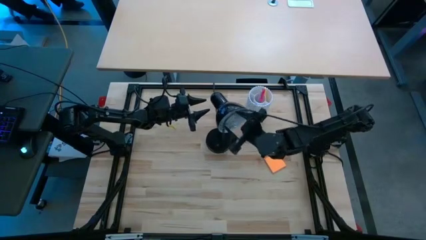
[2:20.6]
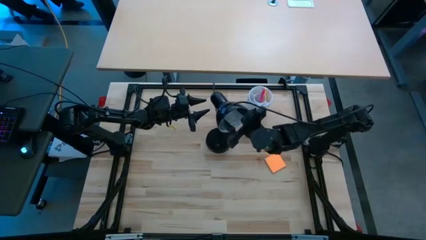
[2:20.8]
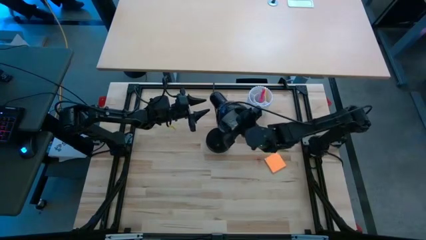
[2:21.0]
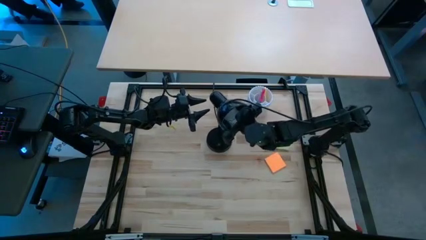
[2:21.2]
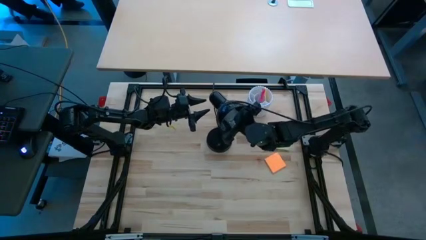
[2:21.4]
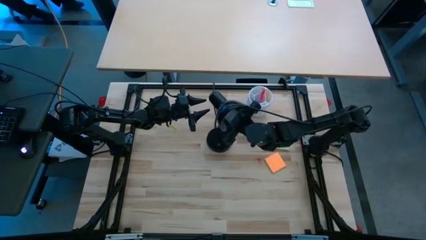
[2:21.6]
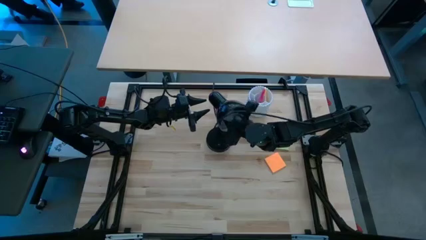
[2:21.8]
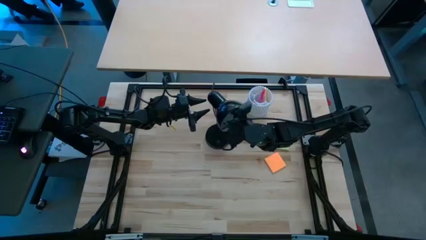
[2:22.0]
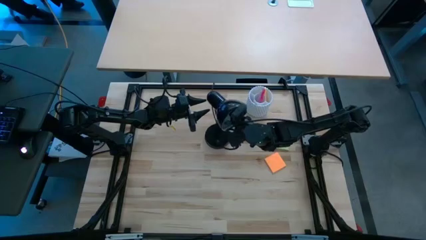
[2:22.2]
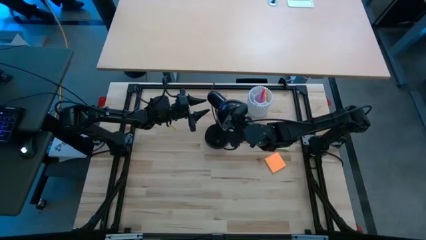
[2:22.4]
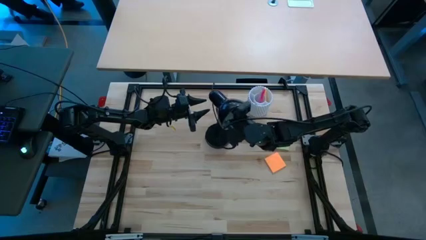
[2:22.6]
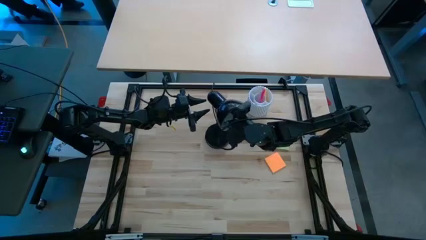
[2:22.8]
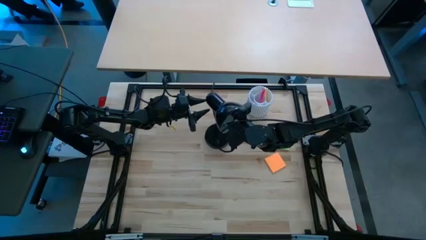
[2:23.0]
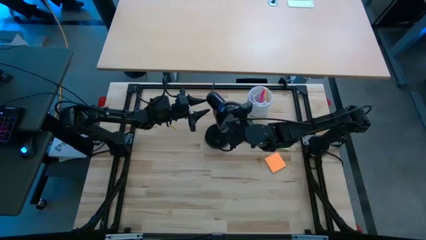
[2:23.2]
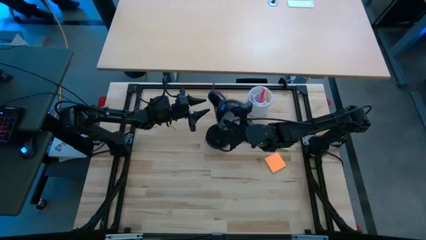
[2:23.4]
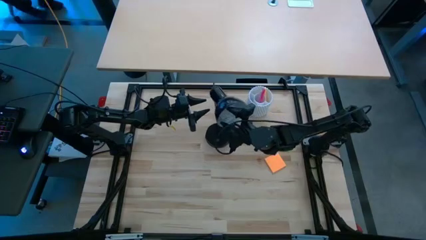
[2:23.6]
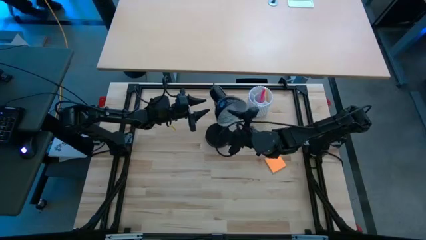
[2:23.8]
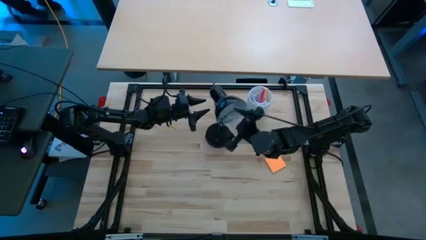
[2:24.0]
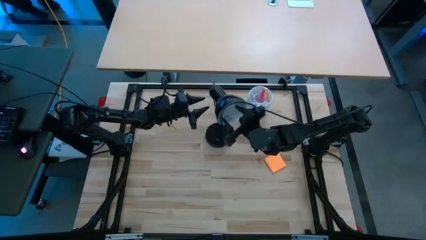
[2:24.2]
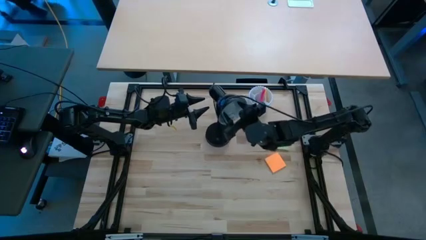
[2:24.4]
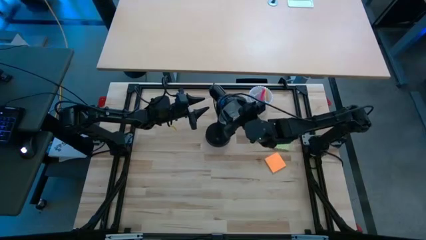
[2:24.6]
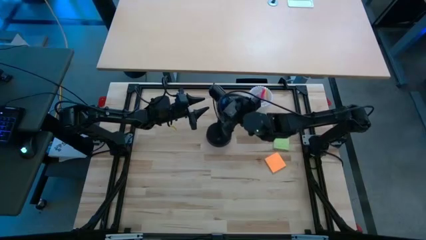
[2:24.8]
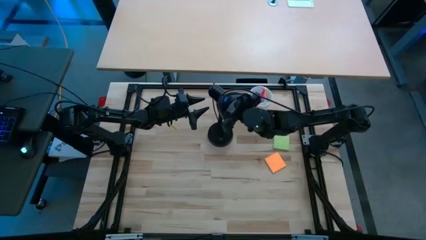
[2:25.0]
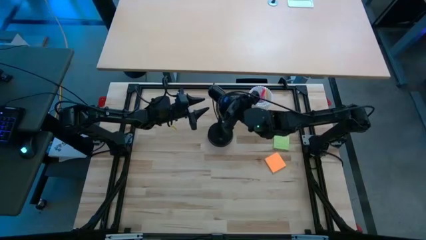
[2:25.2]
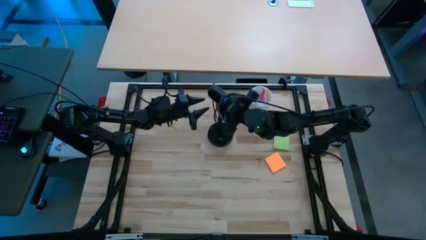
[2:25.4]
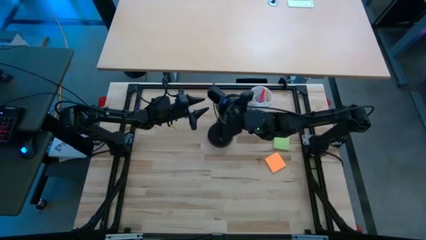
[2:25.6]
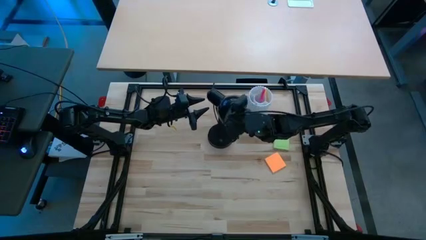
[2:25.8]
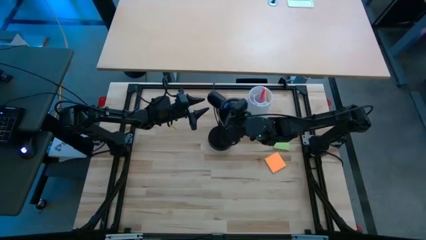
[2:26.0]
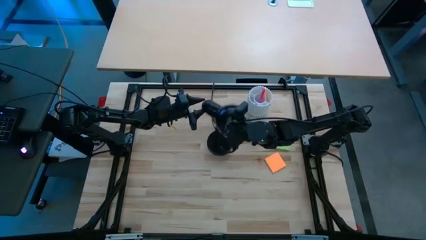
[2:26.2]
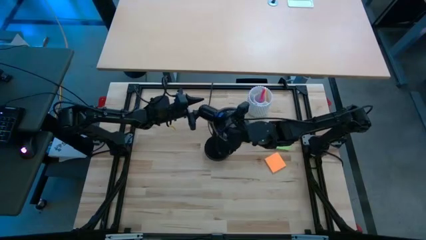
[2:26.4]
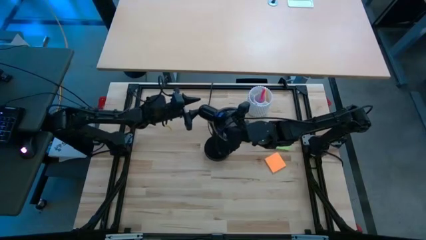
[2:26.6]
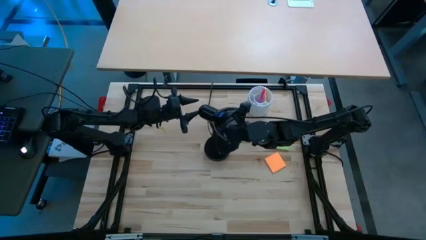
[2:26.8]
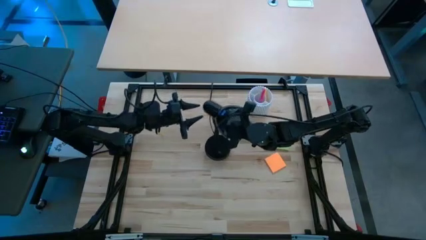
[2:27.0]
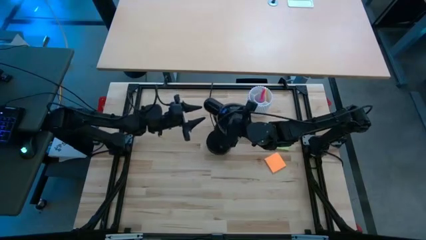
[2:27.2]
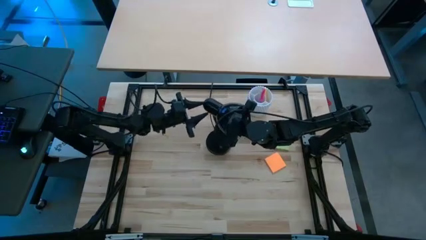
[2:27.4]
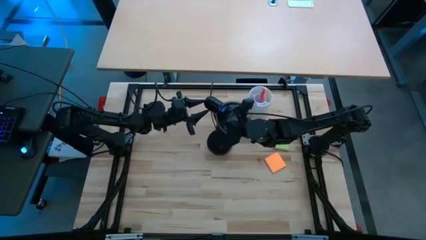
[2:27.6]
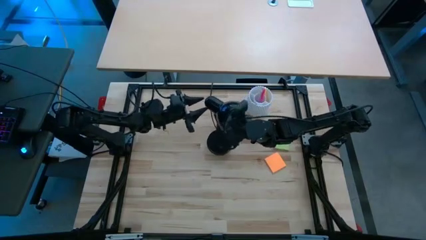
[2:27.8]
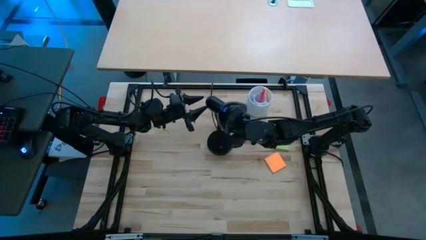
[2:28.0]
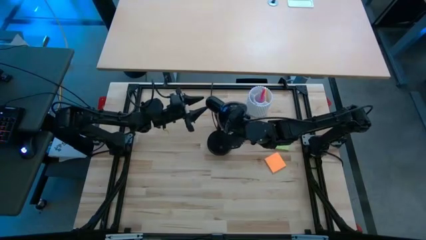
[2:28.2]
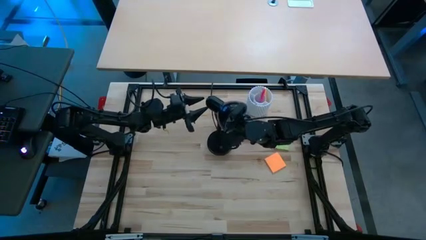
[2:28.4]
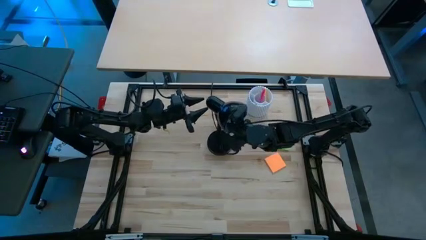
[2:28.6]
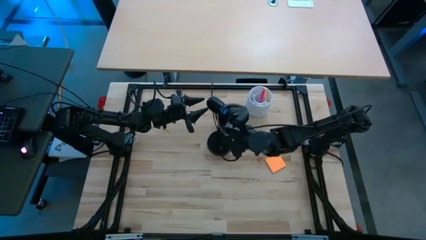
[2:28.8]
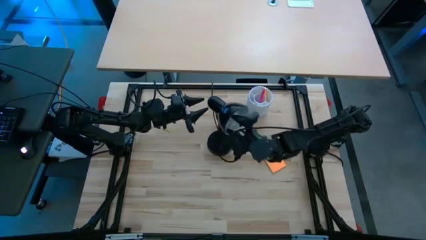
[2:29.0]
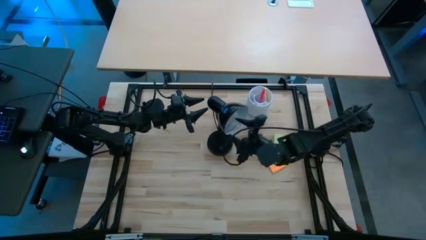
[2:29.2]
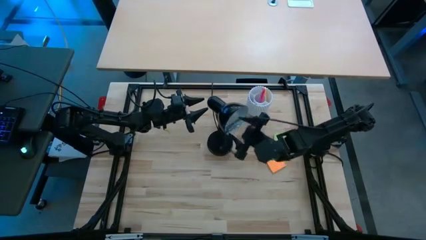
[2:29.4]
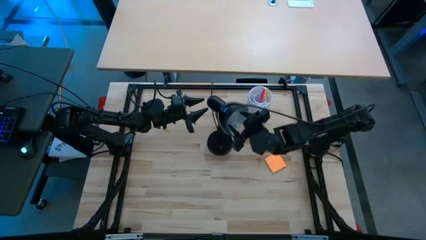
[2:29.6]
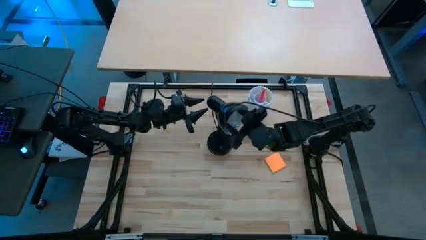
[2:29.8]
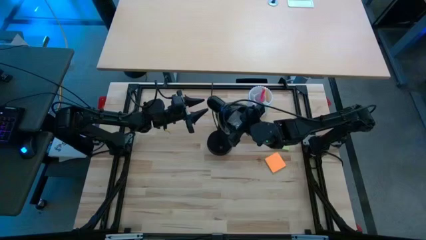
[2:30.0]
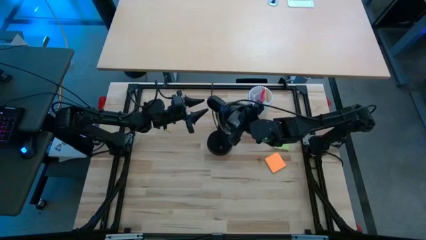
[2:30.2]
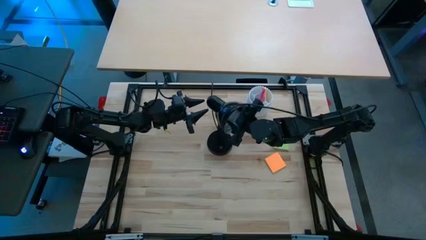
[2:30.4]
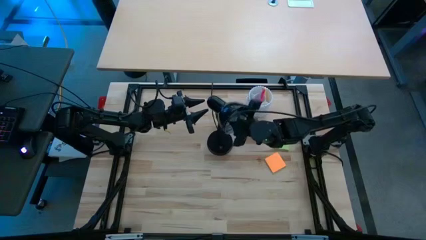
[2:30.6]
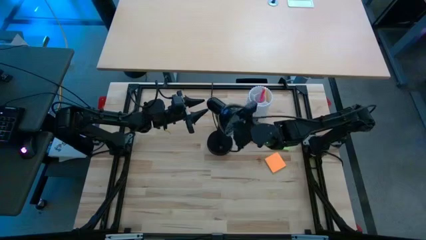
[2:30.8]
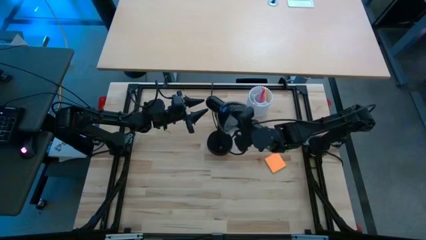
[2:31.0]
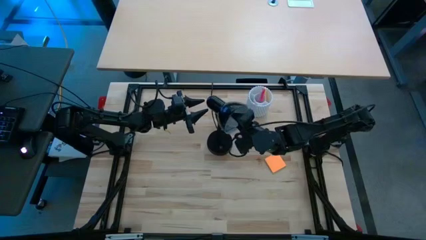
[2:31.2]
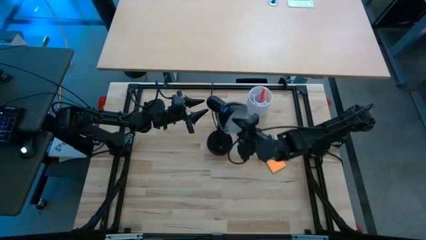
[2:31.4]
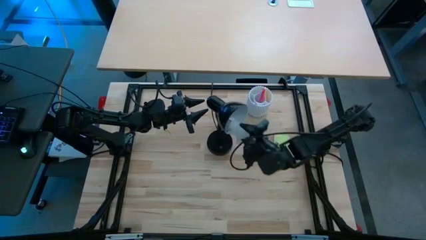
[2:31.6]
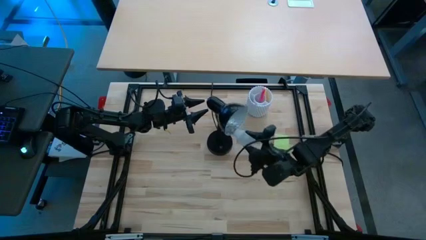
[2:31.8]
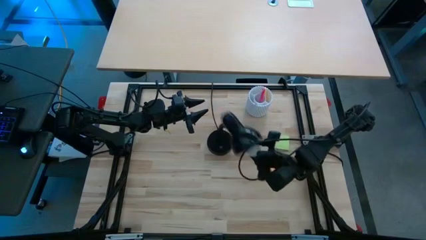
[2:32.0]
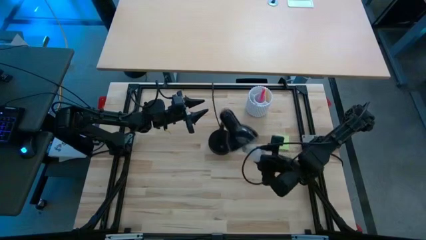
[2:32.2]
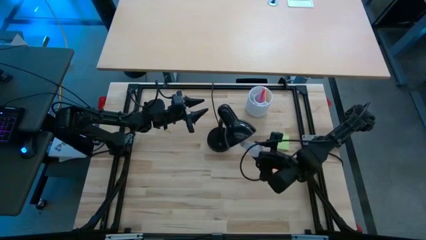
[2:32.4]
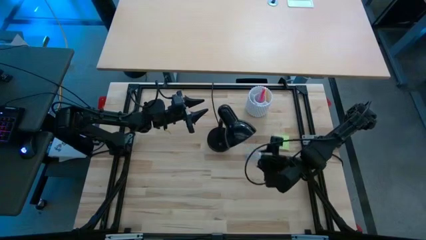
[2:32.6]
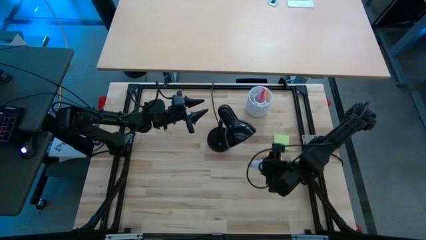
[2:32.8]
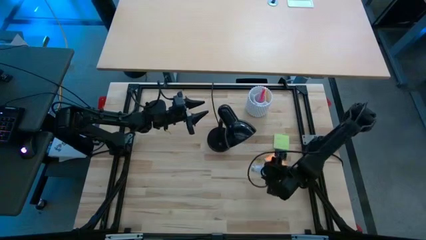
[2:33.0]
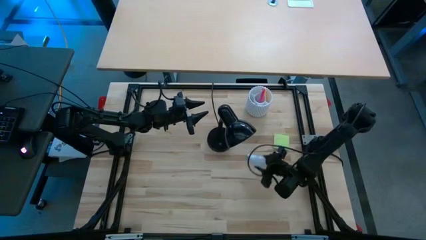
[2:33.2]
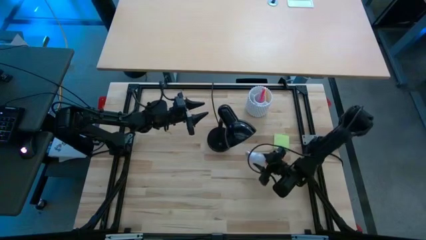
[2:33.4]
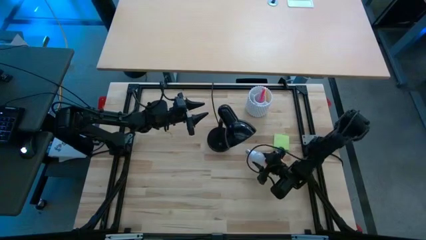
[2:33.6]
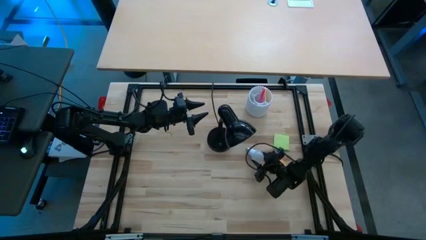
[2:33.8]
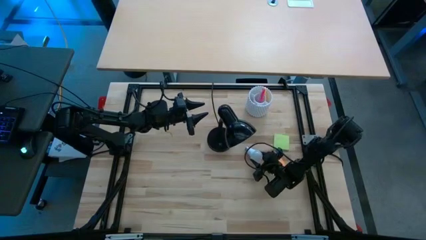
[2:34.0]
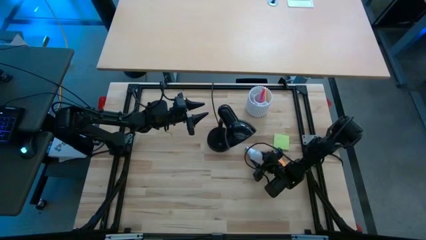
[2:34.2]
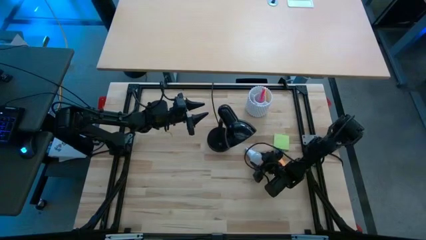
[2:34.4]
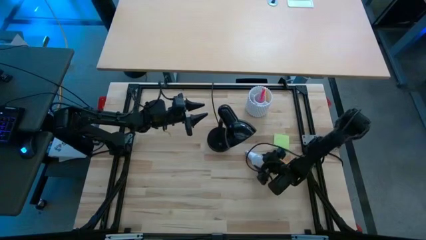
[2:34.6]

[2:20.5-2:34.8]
Task: Screw lightbulb
Remove the white lightbulb from the black lamp

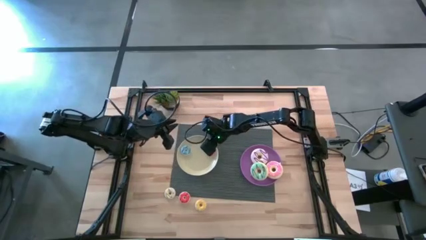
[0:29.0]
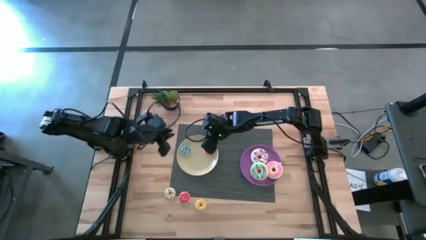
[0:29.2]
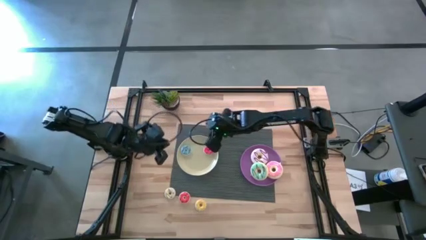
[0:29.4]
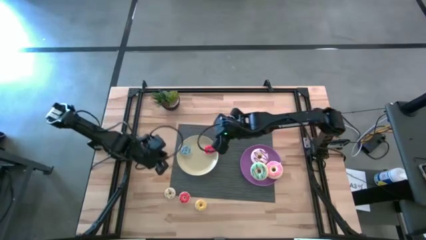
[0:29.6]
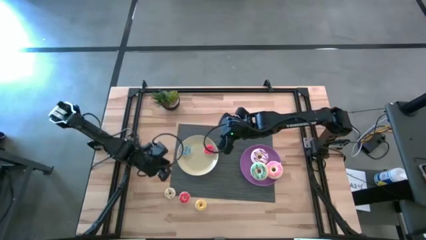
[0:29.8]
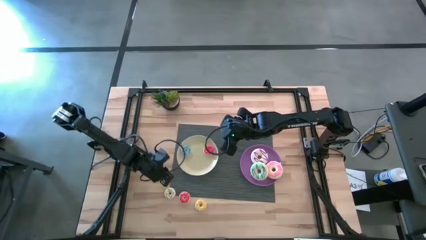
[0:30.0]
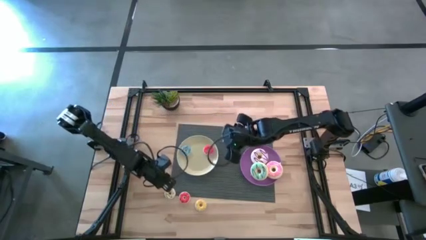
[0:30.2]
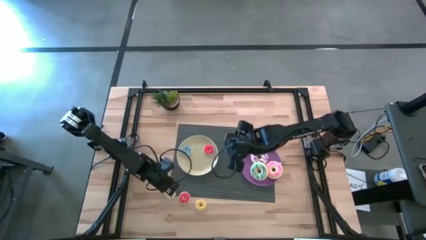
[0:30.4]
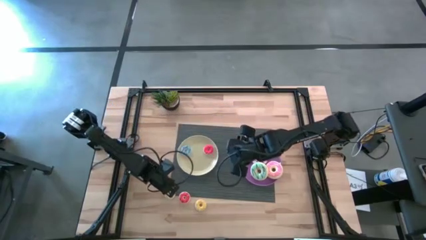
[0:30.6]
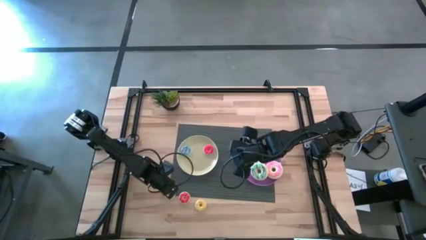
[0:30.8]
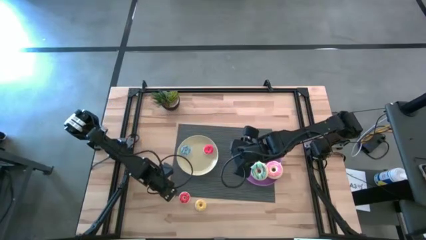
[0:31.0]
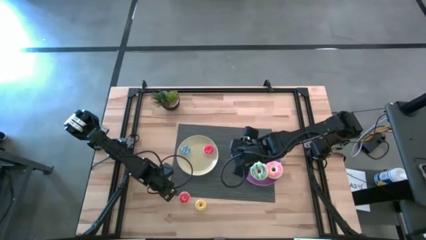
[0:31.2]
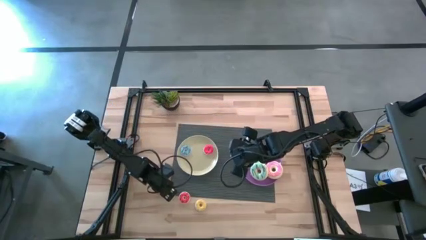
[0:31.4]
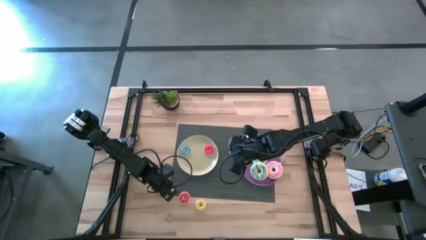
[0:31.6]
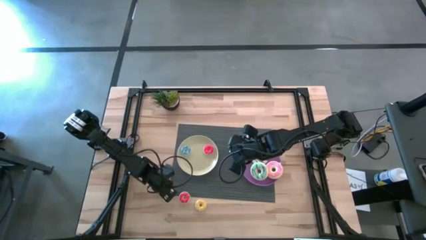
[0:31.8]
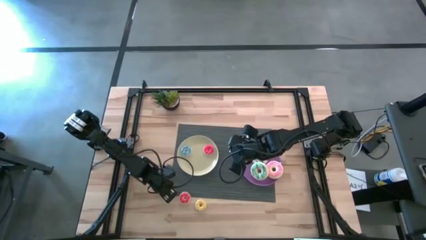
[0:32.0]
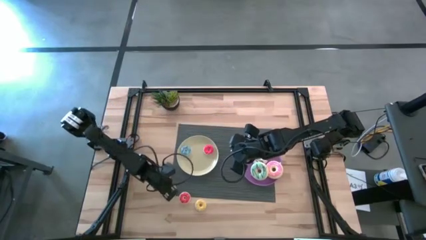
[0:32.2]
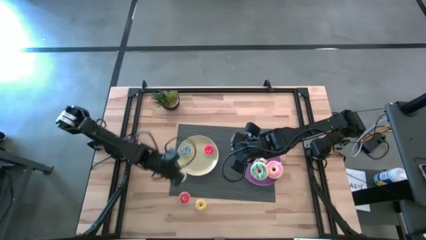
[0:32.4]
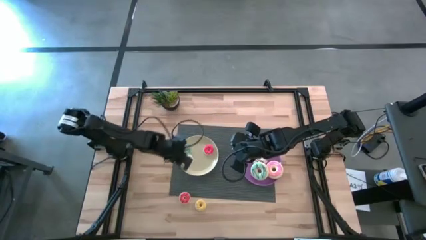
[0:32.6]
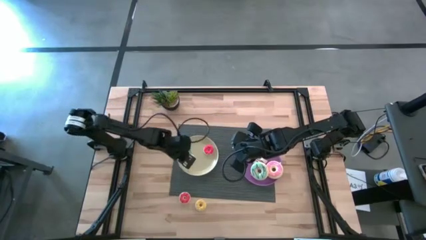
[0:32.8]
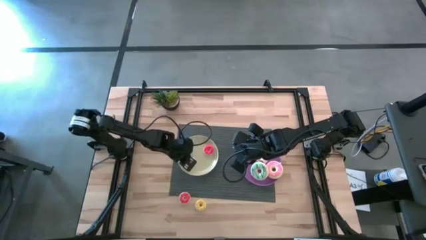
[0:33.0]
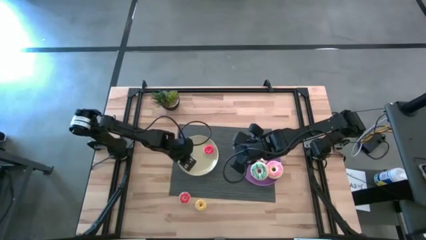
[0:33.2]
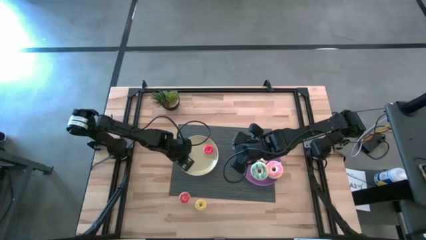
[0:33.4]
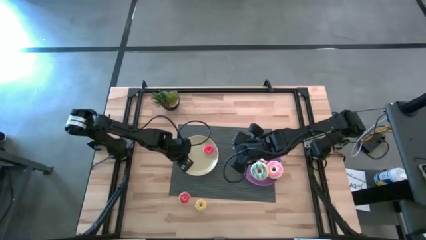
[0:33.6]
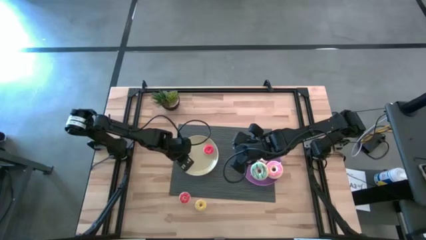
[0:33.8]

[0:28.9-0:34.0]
Task: Pick & Place donuts
Put the small white donut on the white plate
